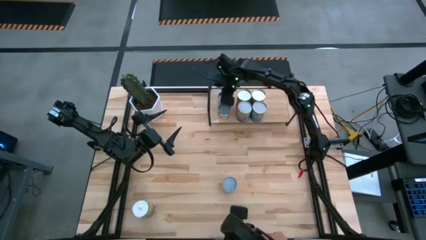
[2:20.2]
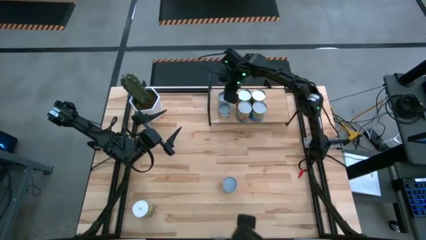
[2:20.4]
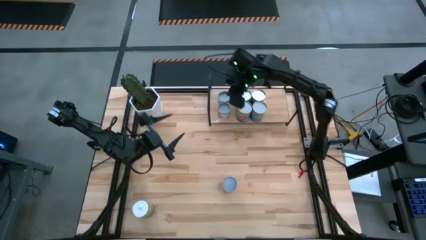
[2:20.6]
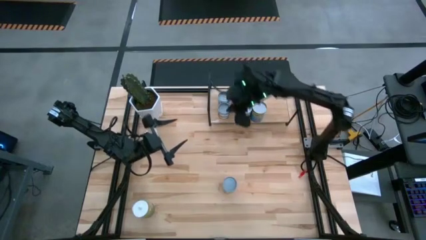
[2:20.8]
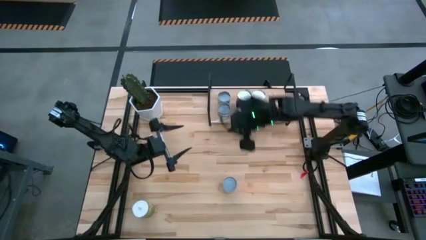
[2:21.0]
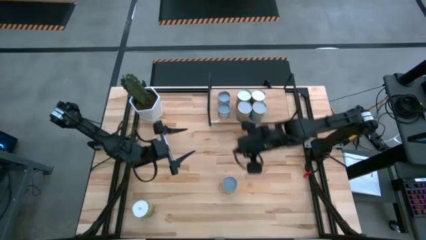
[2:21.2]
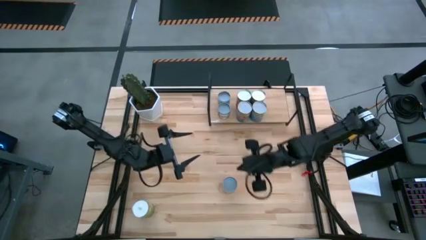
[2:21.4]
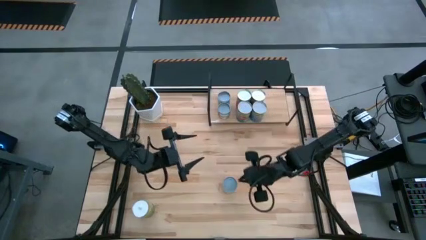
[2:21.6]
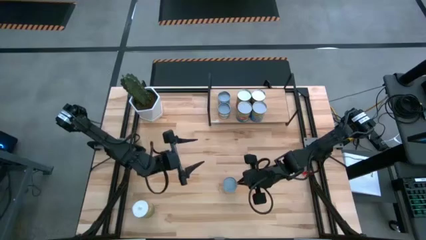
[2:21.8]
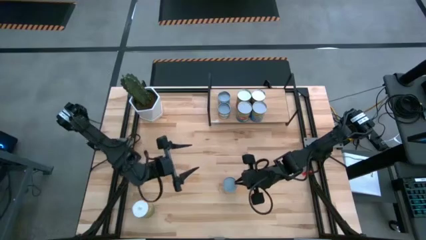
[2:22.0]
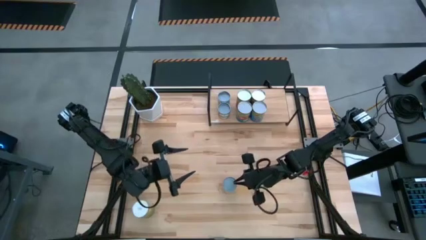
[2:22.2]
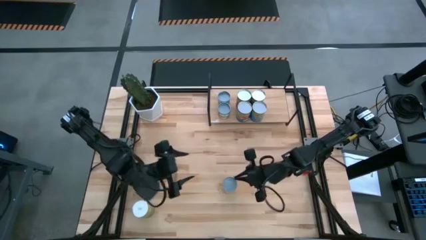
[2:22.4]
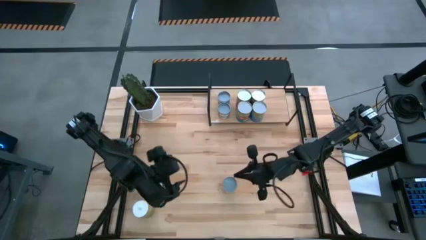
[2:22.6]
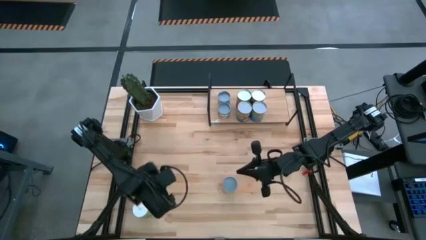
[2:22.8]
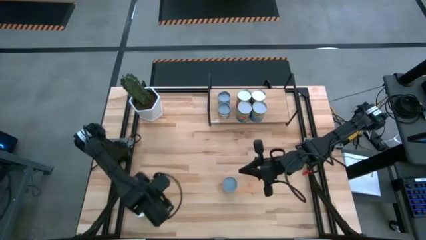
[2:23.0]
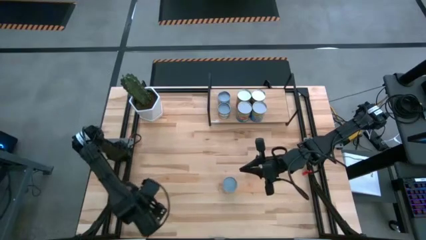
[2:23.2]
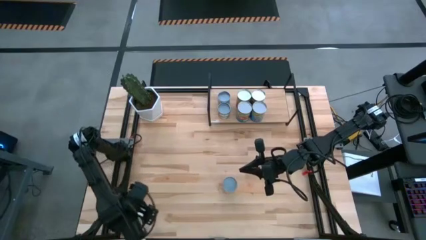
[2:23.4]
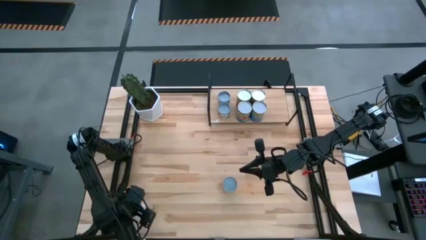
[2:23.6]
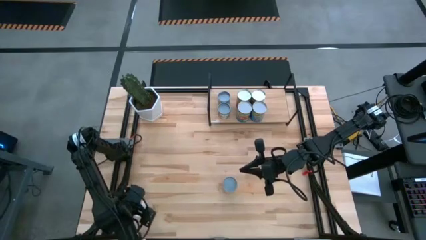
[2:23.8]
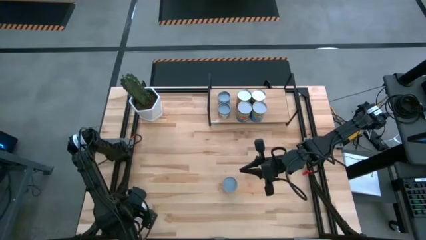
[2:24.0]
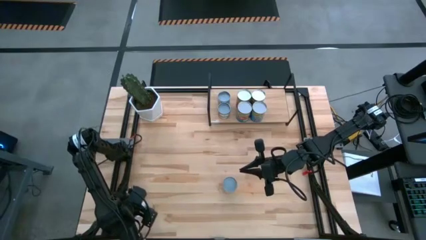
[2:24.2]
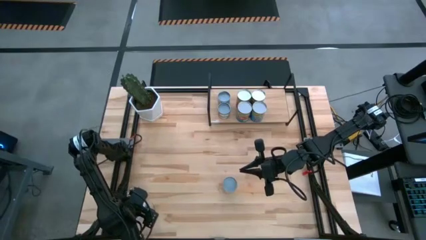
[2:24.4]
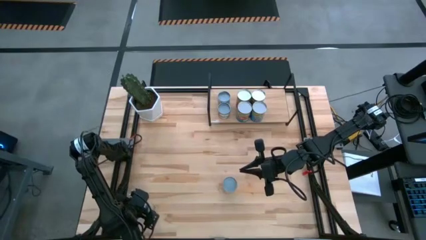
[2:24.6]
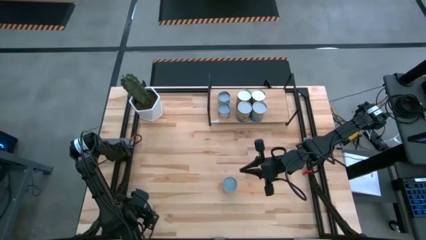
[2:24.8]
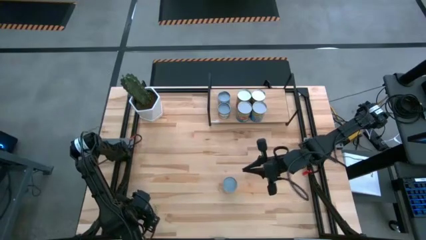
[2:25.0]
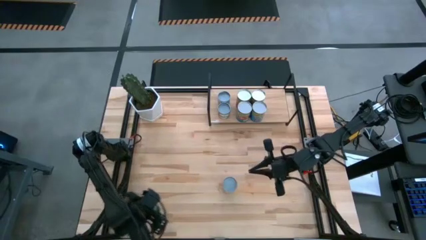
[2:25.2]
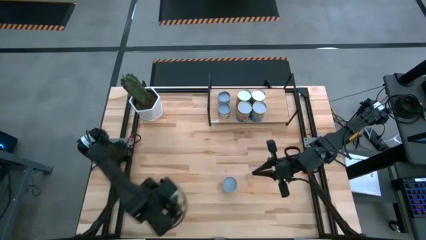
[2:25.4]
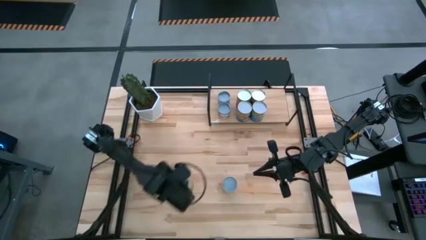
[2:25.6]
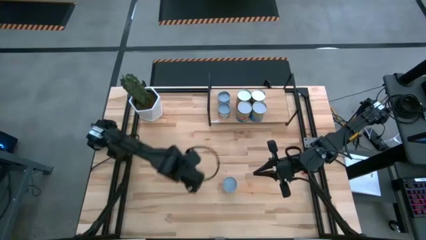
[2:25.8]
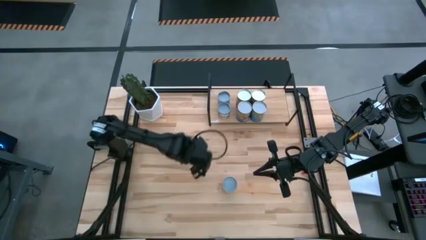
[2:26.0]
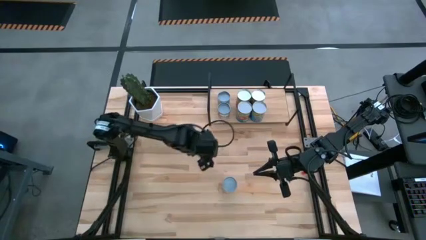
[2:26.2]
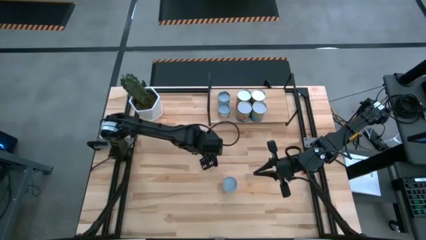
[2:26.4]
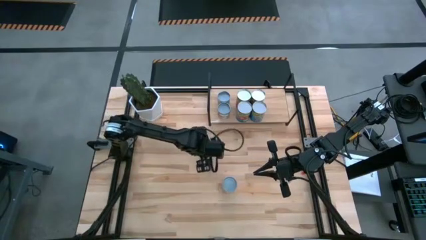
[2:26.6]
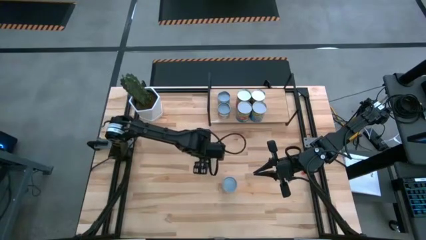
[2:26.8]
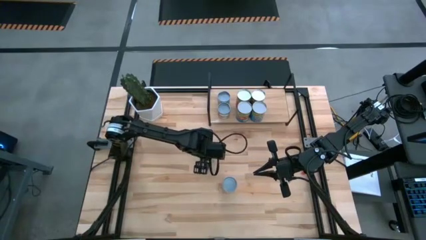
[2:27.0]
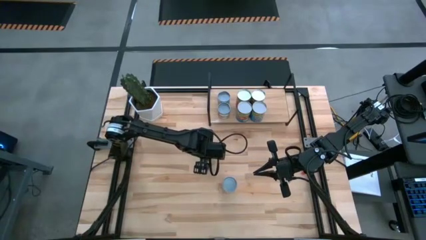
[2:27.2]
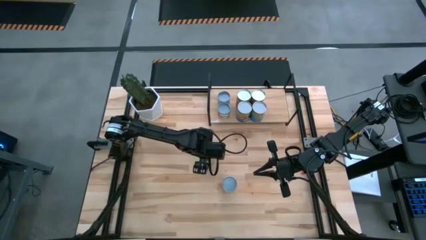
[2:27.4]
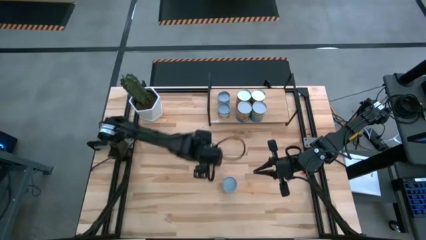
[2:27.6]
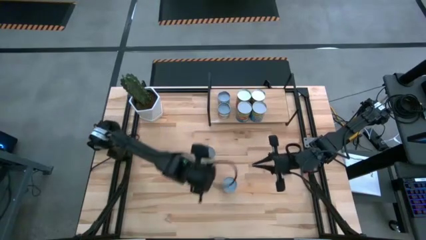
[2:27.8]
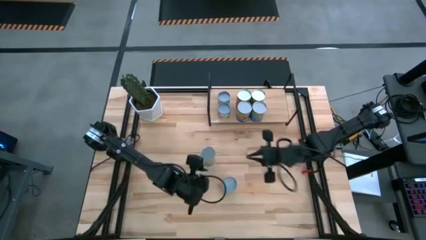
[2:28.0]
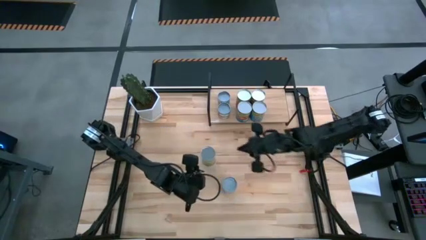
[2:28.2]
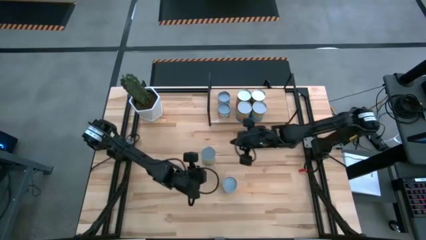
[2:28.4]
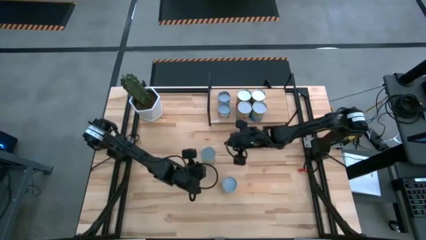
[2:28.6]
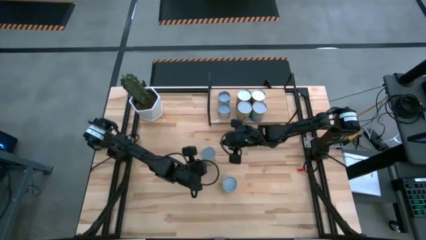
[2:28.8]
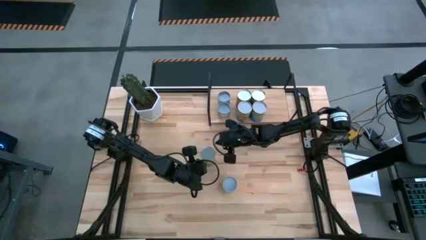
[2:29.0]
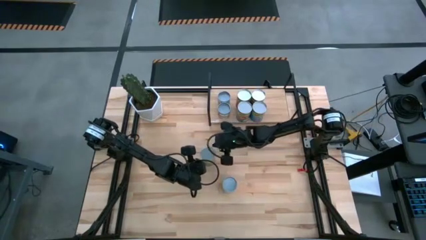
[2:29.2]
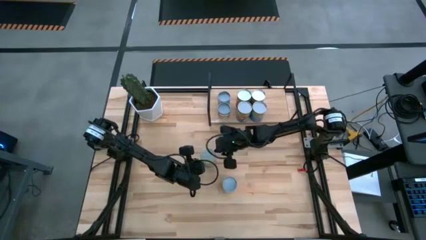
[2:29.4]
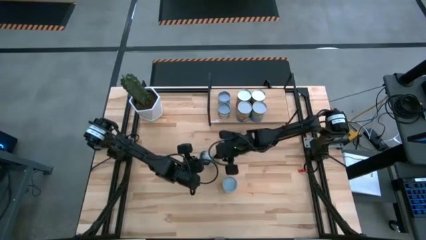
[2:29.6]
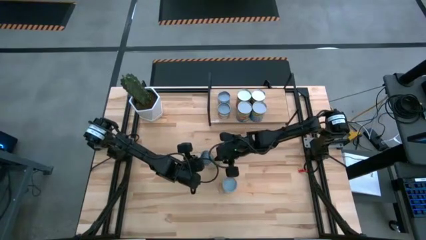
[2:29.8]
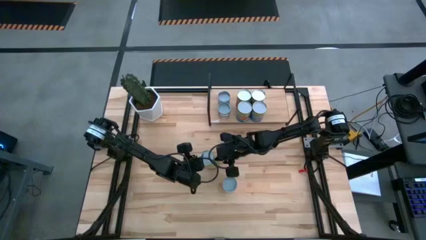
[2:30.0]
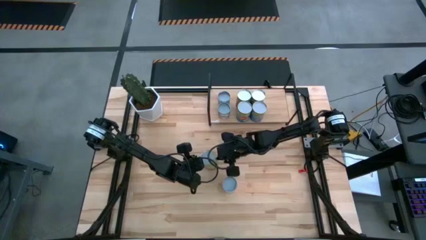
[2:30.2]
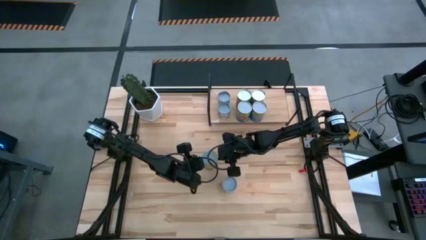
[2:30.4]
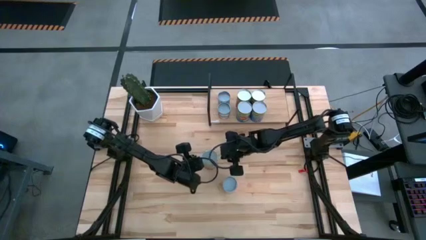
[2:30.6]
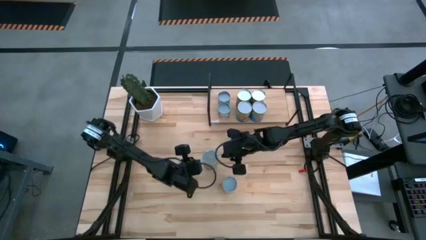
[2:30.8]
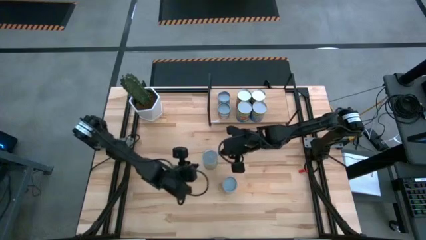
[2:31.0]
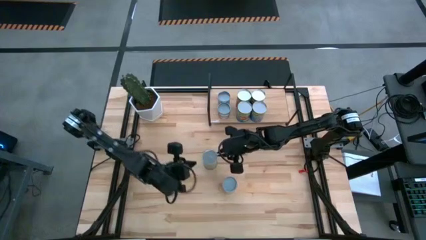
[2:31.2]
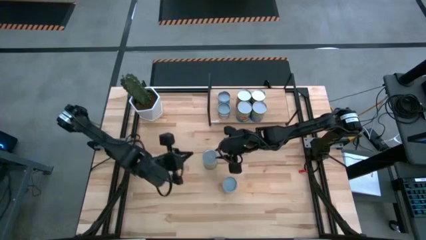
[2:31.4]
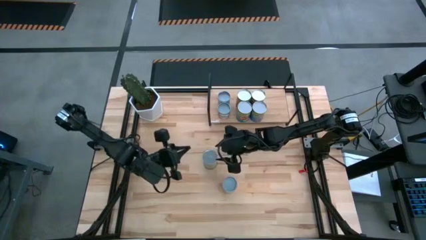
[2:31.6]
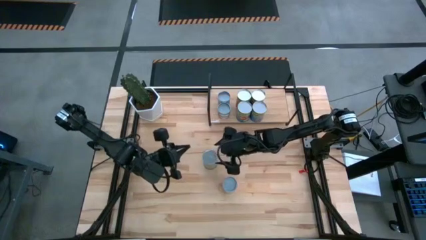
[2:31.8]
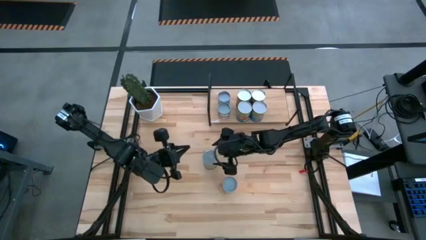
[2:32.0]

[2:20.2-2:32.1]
Task: Pick and place cans onto a shelf
Put the canned oranges on the shelf
